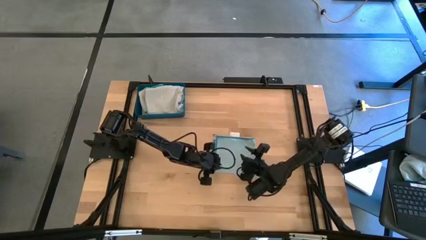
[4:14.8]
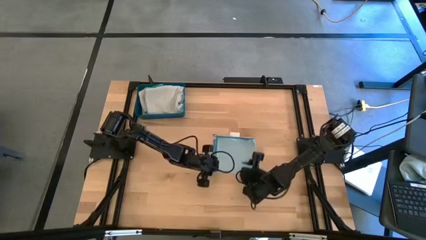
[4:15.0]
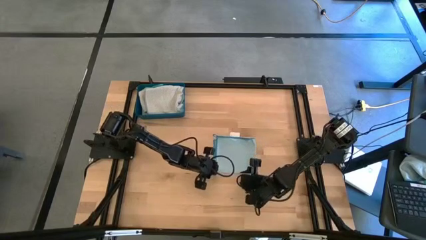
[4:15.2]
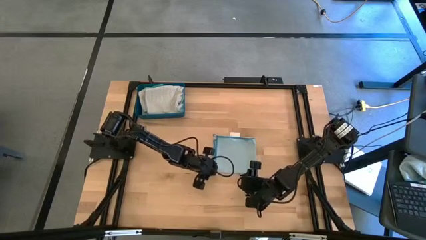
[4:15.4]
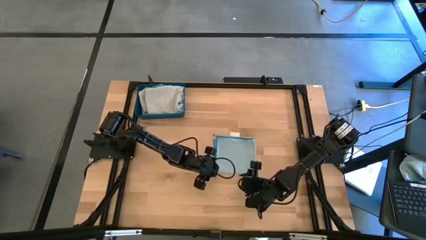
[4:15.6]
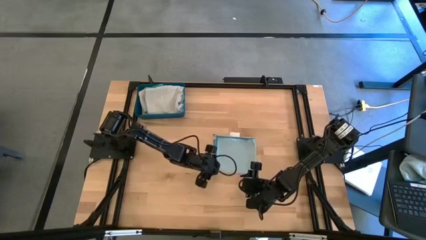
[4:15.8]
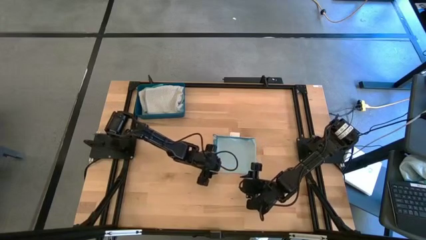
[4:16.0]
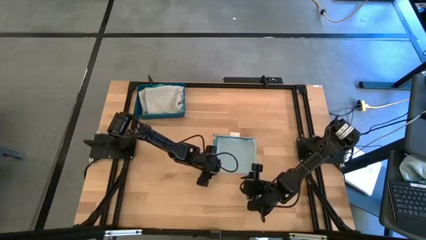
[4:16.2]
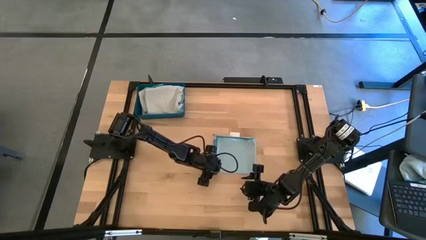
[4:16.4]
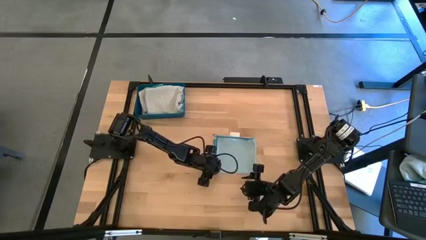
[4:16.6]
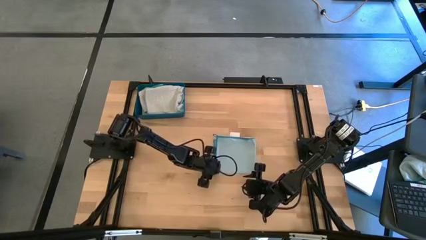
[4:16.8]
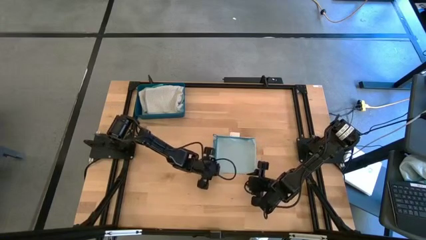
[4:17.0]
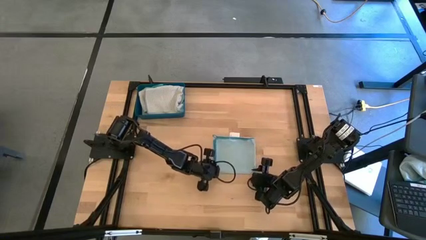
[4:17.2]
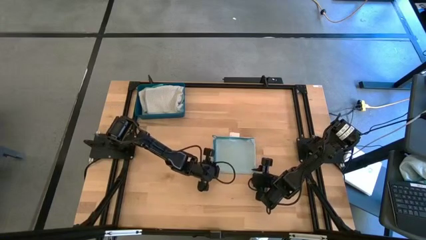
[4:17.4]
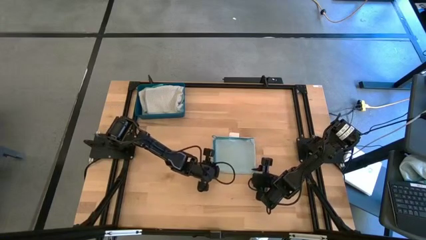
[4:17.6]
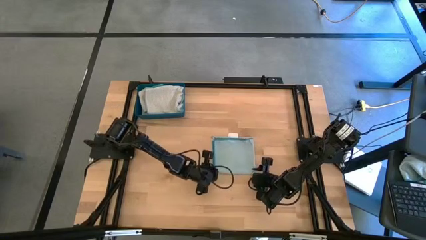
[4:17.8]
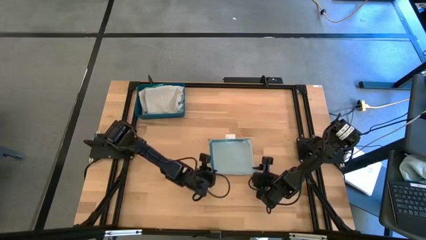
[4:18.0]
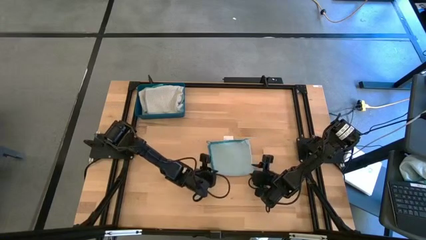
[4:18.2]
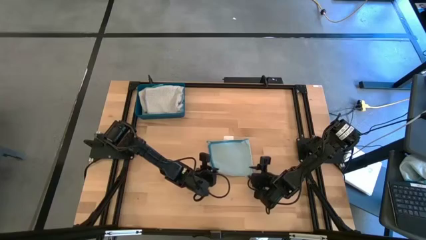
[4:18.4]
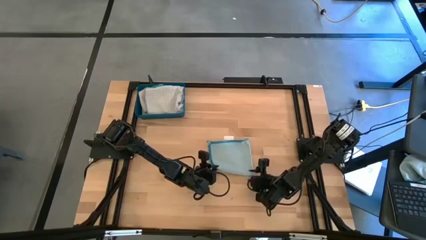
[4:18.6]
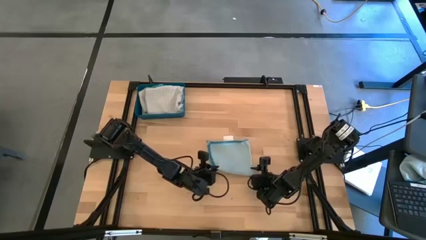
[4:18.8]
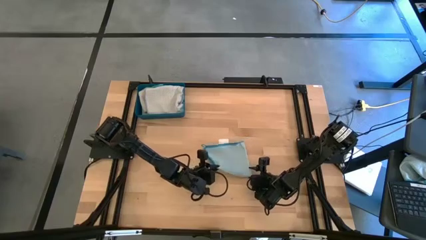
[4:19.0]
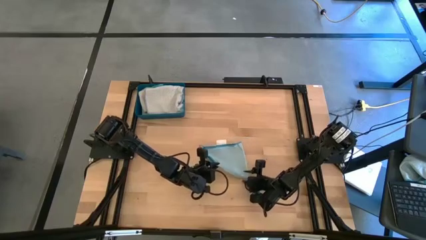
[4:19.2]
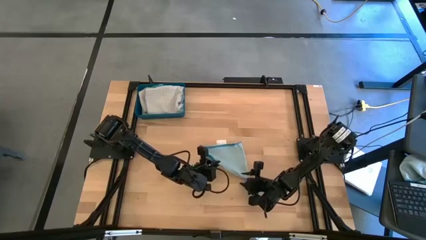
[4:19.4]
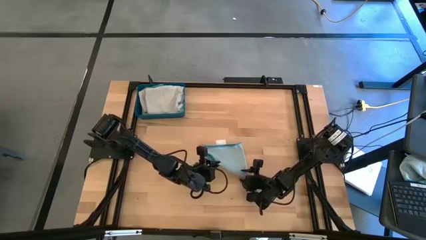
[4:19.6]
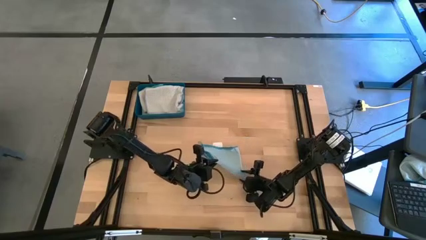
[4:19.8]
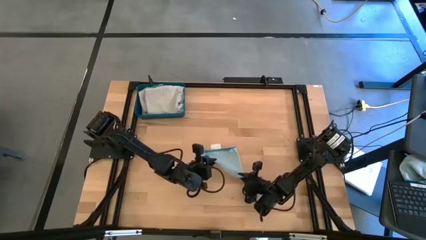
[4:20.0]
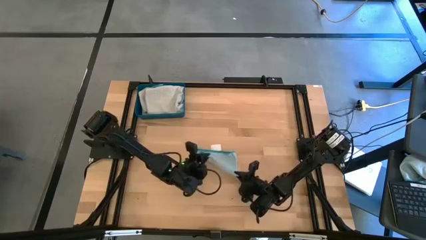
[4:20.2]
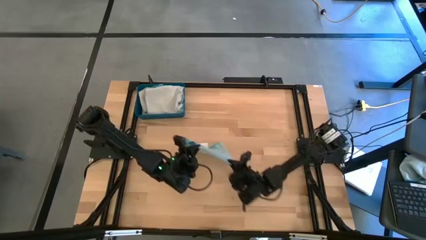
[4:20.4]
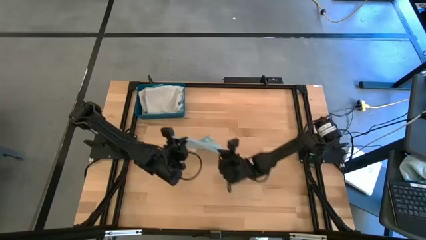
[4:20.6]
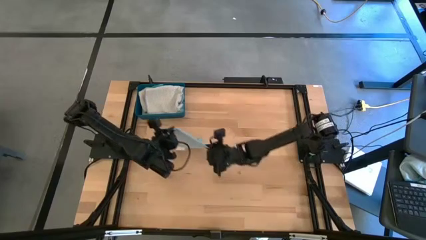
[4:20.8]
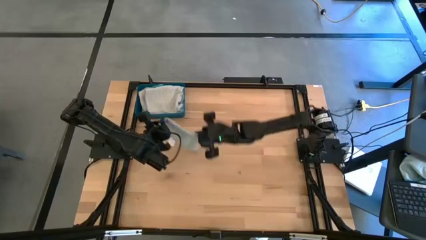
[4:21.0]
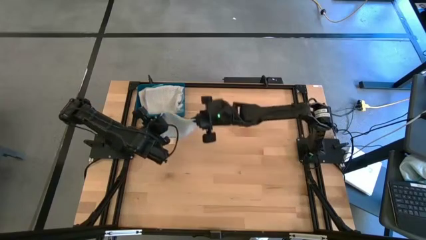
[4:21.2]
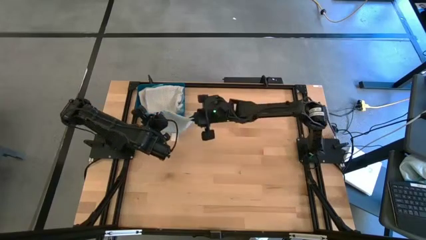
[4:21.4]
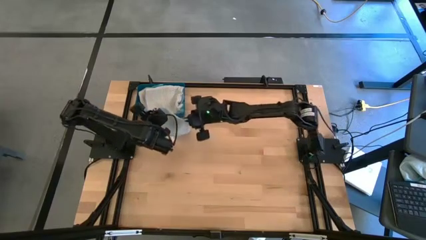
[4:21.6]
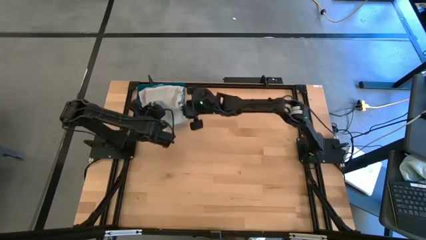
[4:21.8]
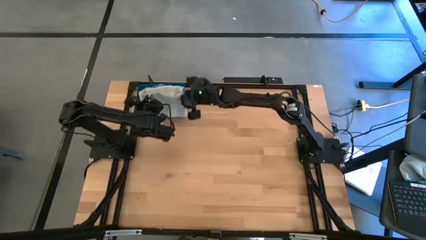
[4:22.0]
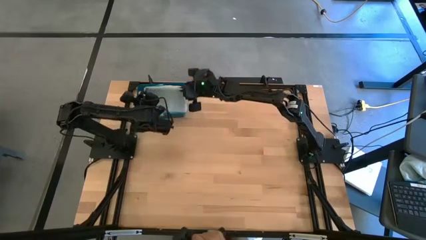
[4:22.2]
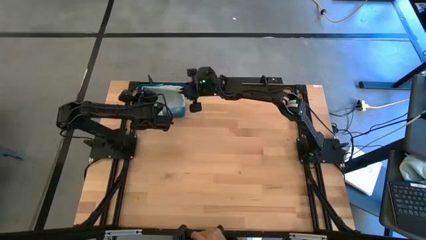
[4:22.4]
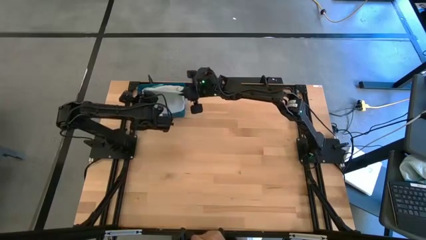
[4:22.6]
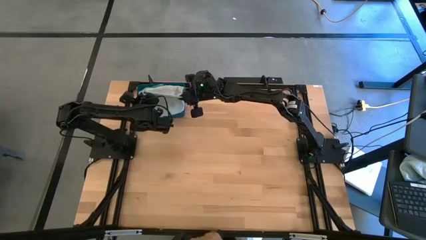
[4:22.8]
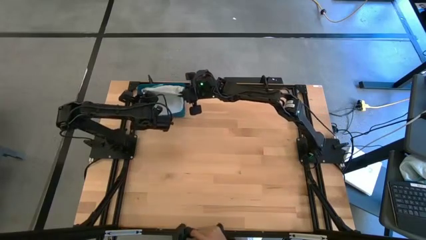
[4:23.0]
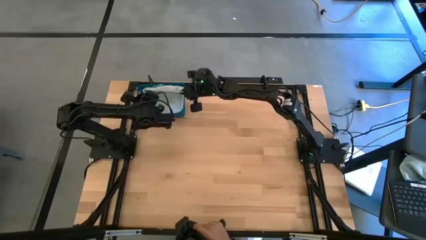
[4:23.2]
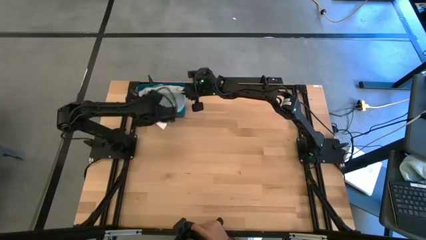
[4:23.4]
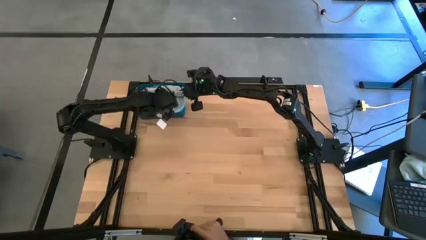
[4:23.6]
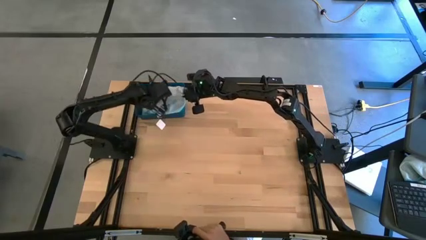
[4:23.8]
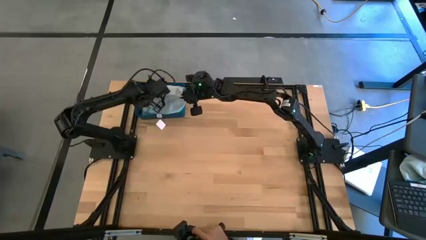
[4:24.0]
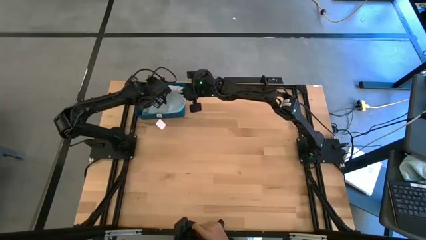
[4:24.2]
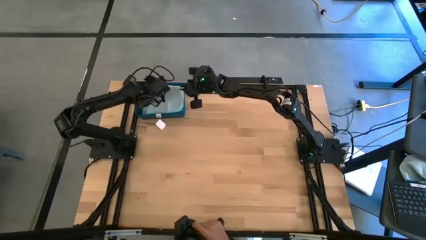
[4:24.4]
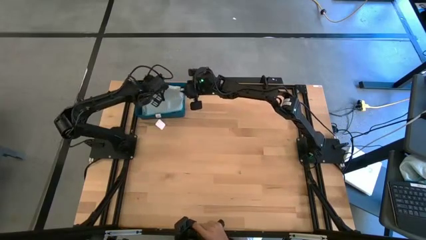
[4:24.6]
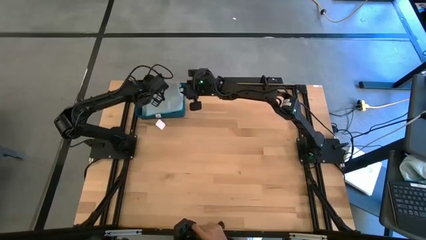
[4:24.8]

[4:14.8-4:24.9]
Task: Fold microfiber towels
Put the light blue towel into the blue bin

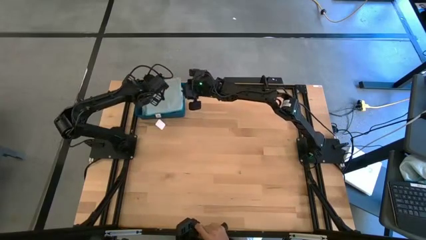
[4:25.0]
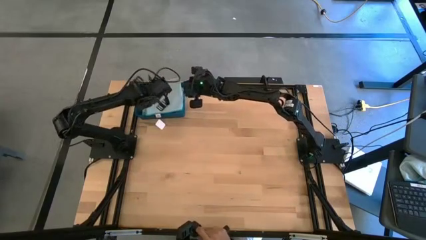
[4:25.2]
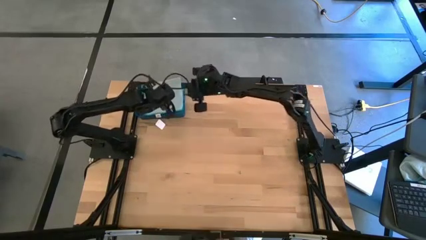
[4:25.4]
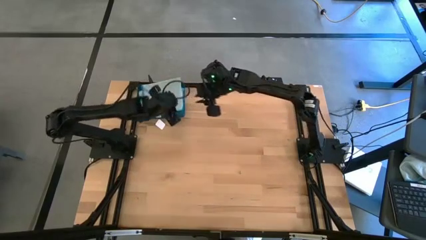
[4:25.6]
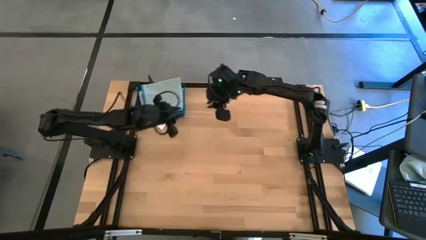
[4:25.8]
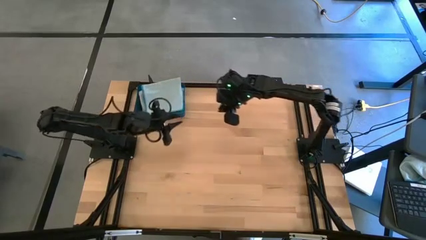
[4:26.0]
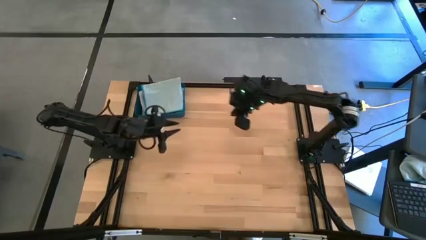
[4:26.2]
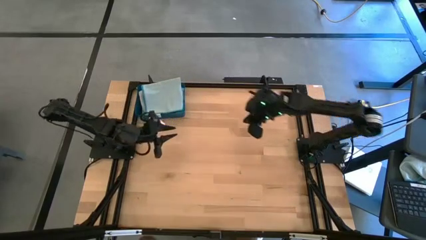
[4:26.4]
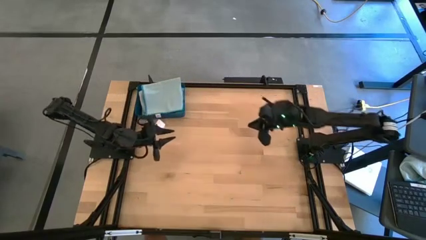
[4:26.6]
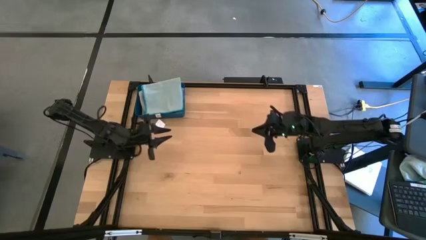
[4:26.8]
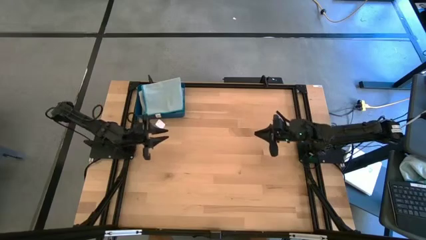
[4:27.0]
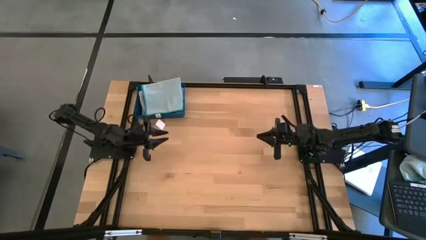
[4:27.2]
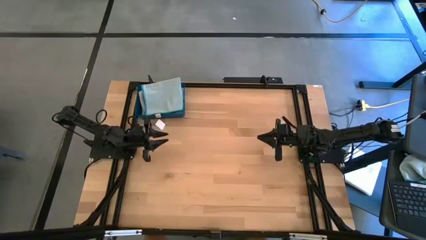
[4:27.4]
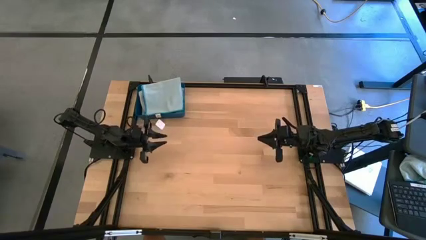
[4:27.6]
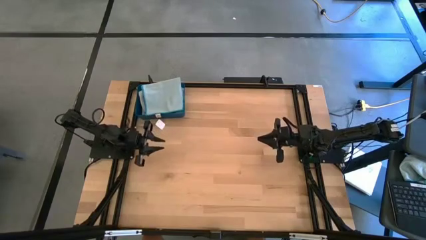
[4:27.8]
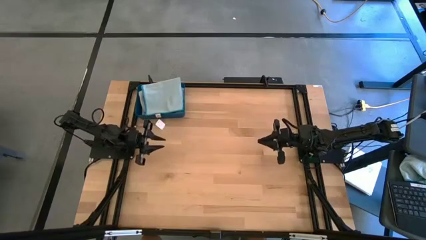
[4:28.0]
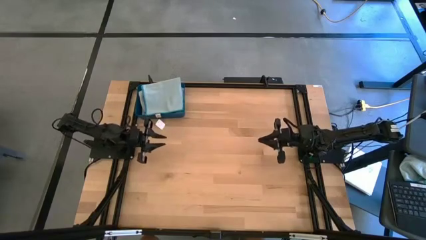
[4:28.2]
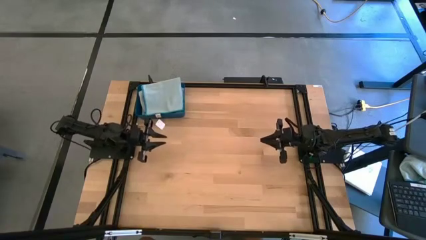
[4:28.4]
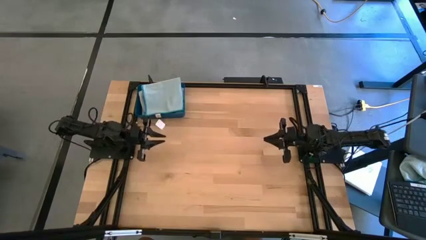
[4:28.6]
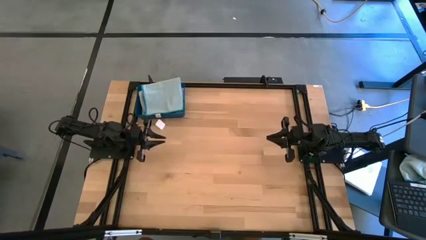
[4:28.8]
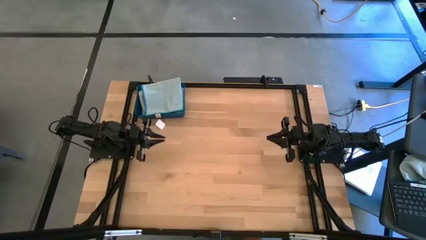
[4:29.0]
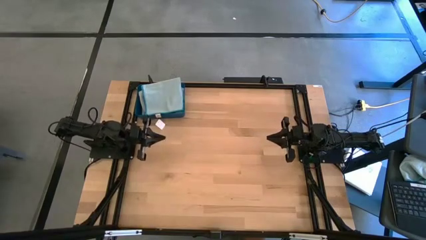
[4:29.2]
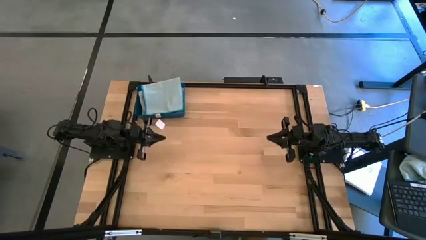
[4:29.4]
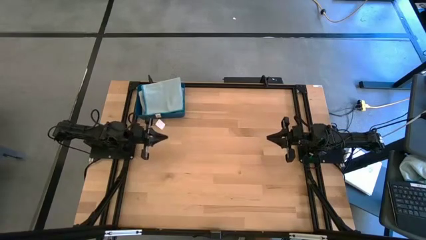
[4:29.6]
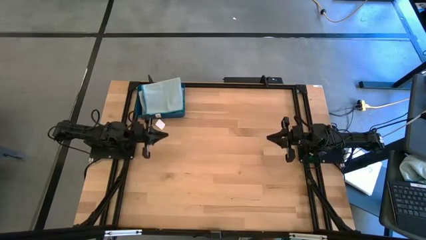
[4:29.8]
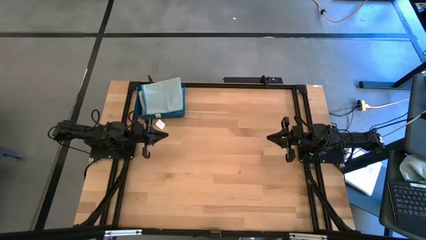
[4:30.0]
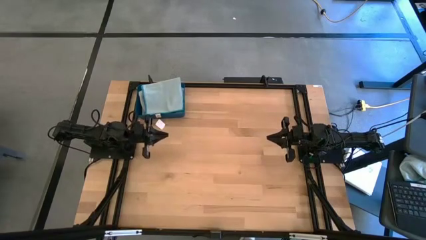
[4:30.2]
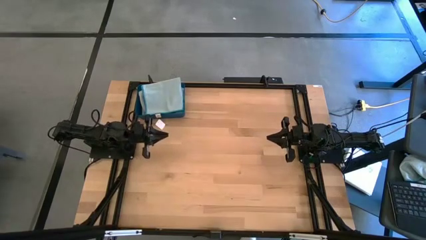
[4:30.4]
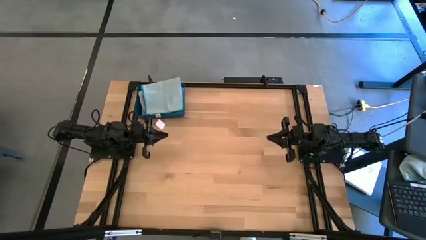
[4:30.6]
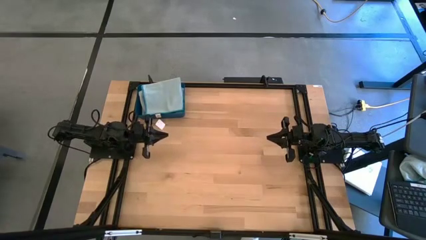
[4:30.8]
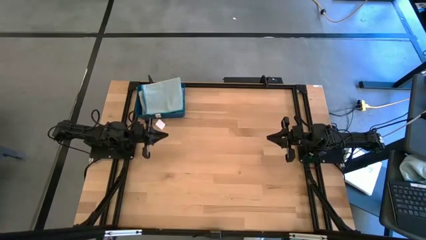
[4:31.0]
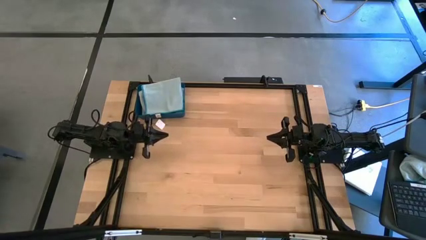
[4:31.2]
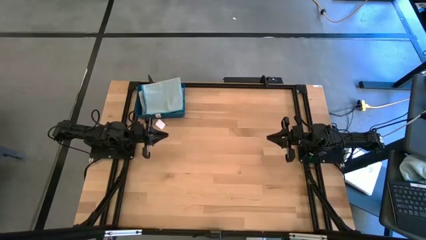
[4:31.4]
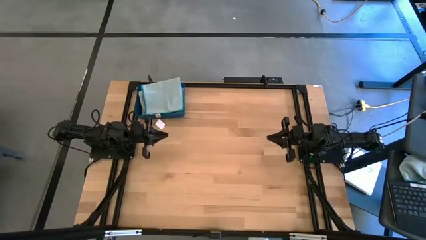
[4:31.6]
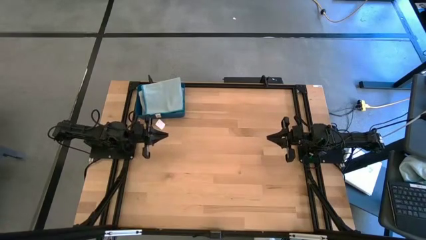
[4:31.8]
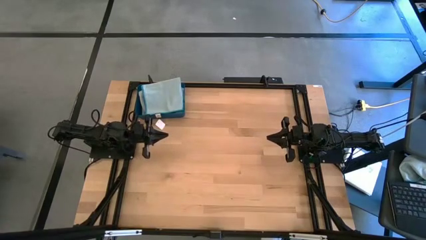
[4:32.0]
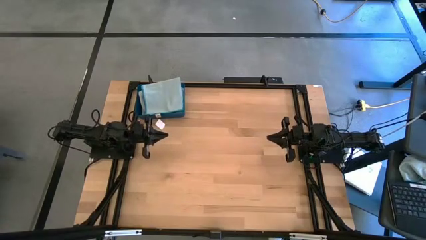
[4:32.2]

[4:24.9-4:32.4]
Return to Home Position
